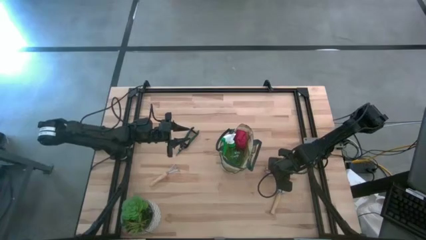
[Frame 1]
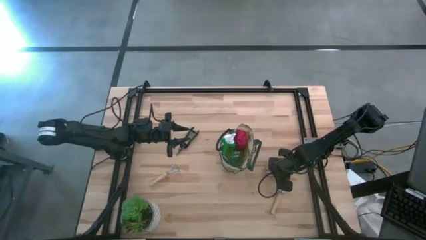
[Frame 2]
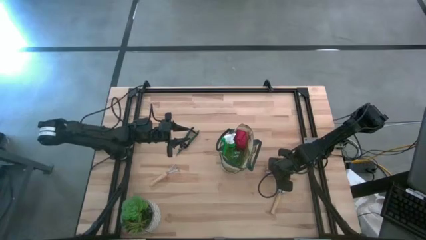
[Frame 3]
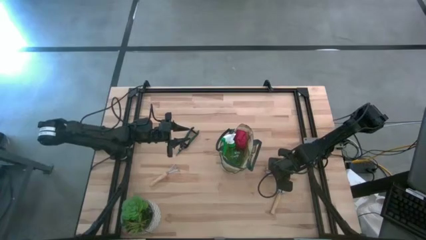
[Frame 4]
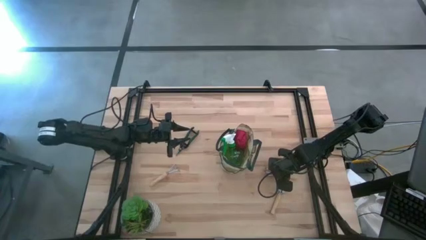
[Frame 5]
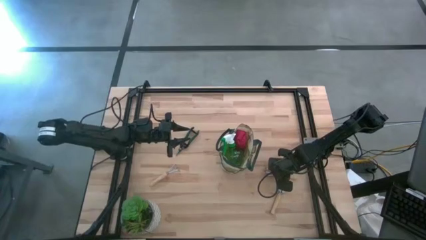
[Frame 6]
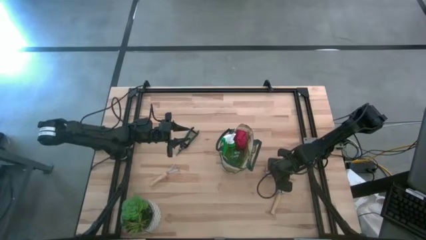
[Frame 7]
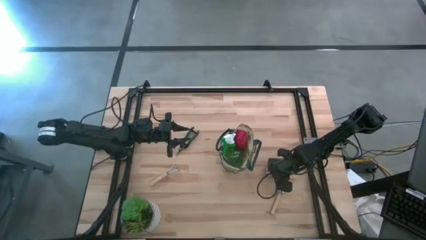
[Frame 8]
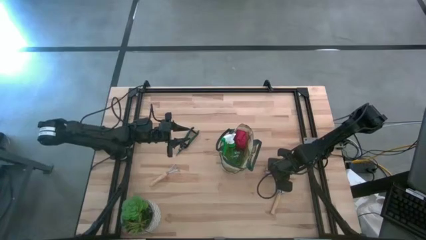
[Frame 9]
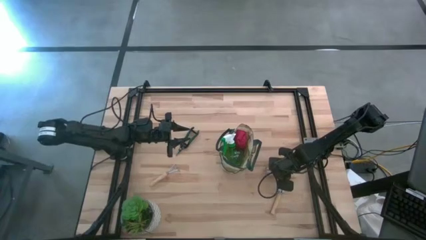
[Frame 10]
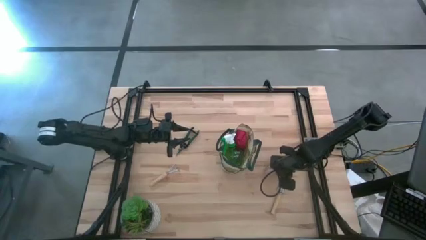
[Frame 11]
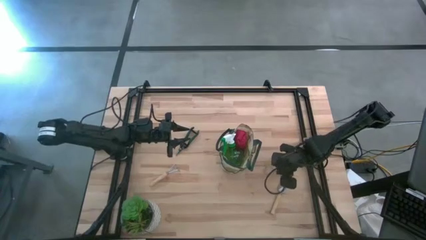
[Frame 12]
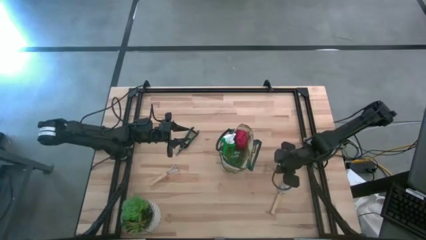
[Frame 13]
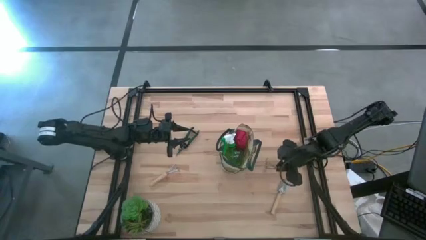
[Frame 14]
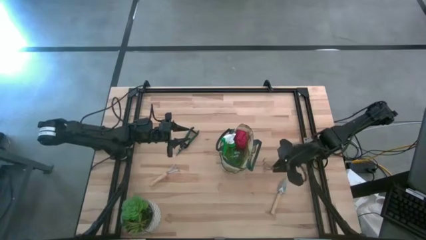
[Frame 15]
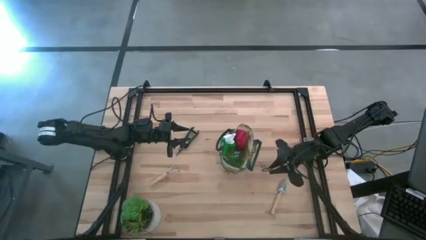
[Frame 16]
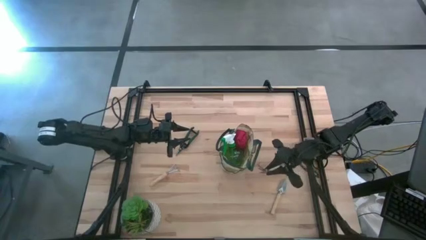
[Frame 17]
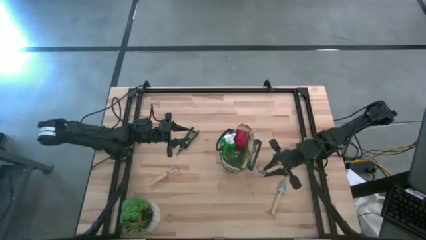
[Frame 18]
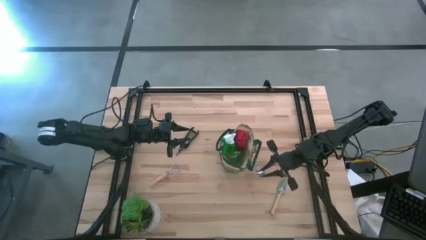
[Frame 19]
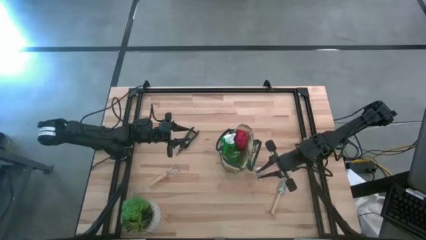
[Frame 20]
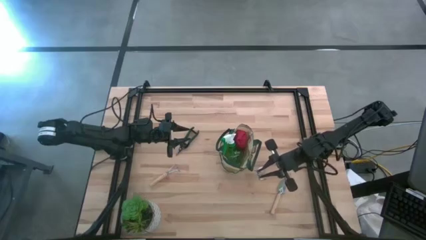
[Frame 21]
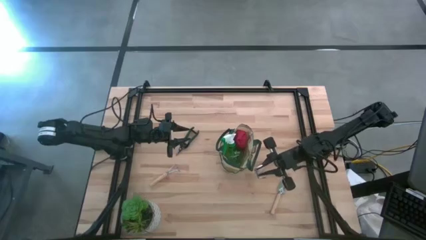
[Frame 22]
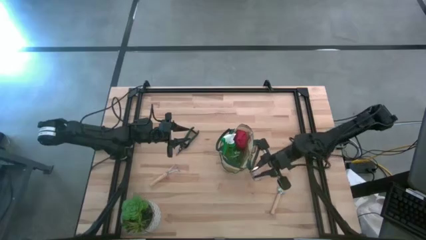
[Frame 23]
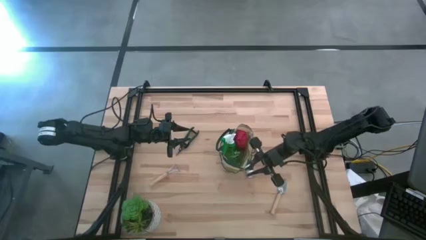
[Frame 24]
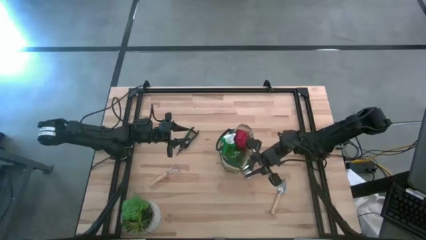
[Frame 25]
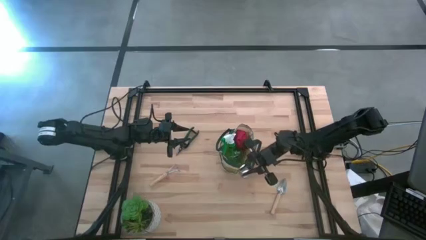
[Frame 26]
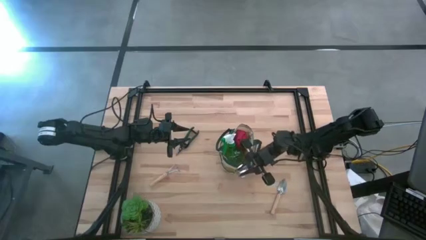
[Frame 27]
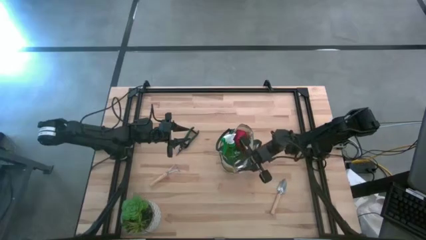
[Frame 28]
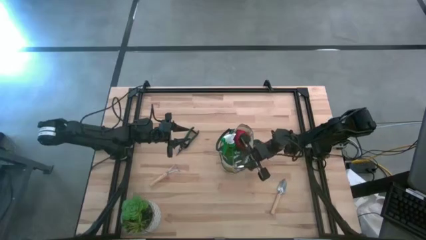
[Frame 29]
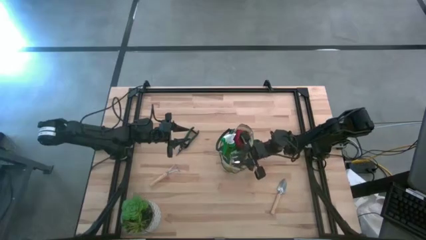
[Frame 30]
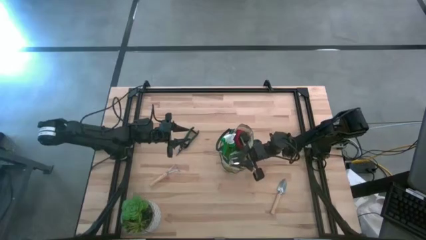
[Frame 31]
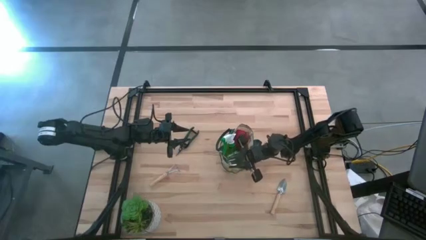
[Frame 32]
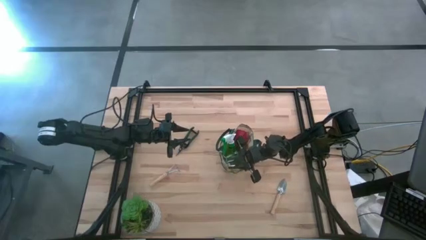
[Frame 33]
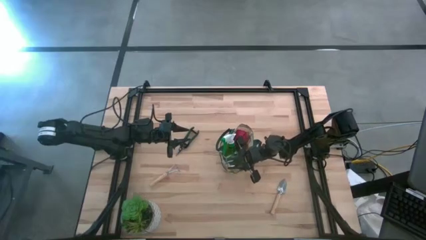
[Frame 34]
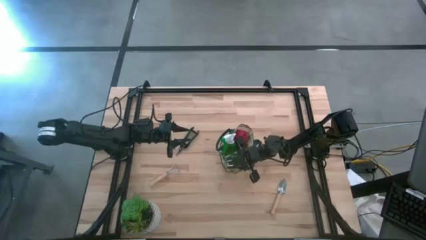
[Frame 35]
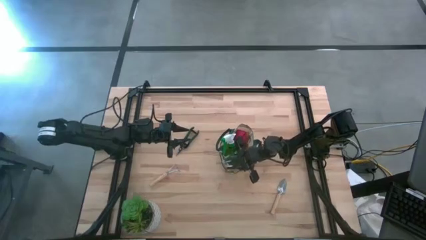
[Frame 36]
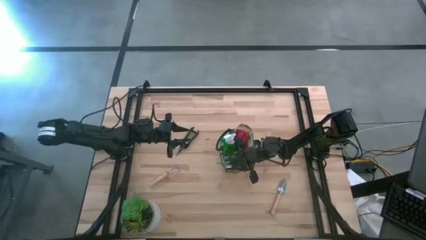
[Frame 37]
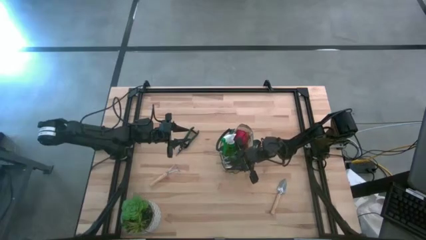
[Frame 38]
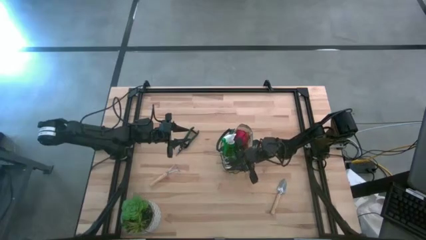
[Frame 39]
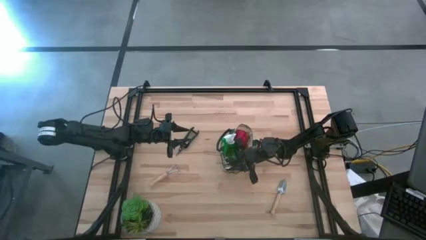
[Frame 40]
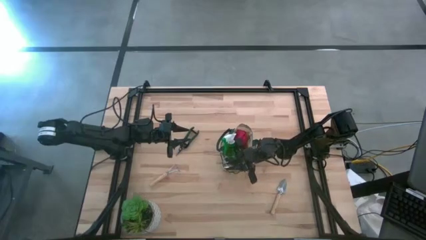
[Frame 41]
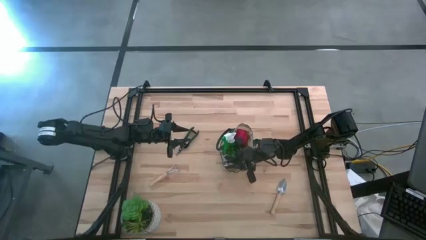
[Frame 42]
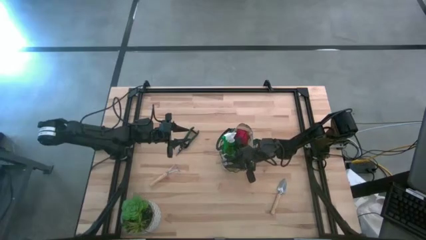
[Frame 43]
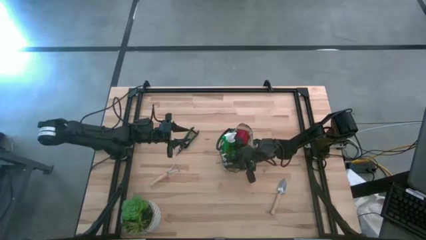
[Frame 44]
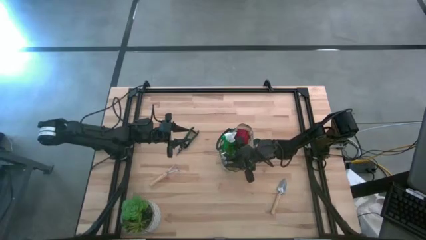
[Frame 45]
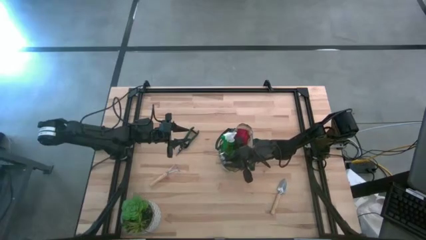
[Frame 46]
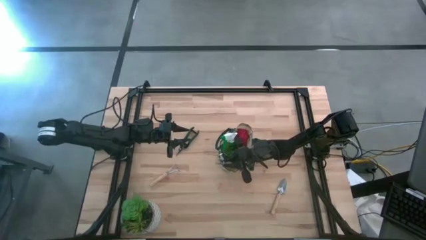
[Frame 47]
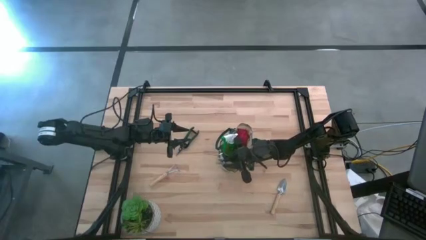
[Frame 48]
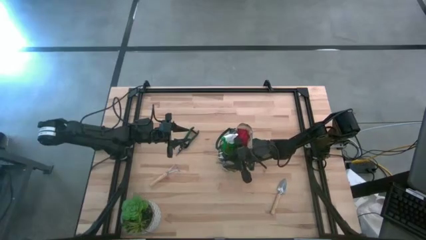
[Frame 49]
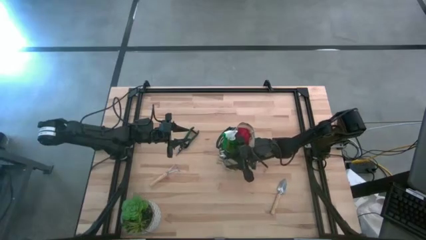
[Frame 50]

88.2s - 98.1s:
Task: Pick & Place Garden tools in Gardening bag
Put the right hand rake into the pocket of the gardening bag

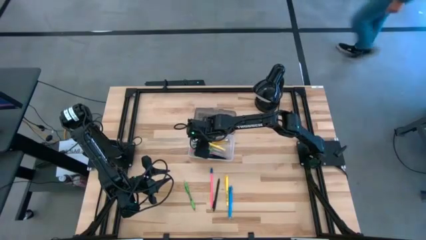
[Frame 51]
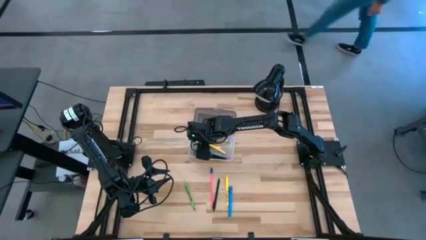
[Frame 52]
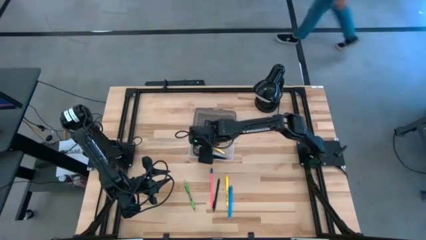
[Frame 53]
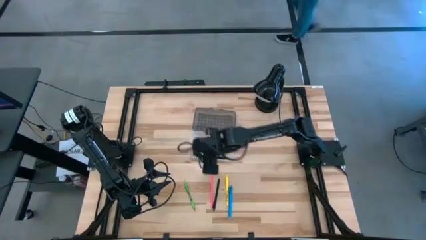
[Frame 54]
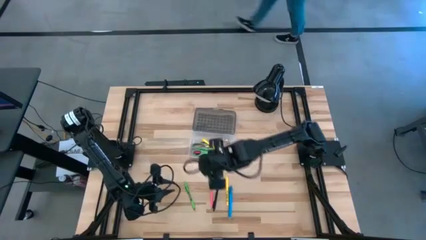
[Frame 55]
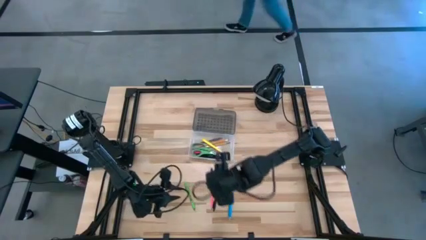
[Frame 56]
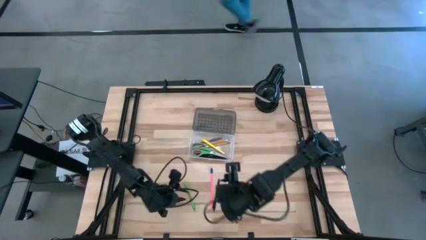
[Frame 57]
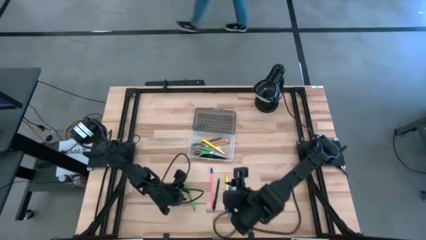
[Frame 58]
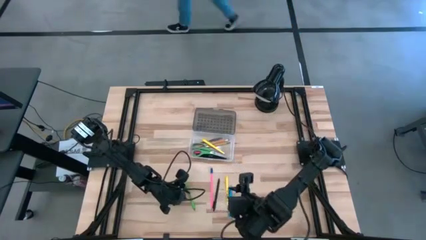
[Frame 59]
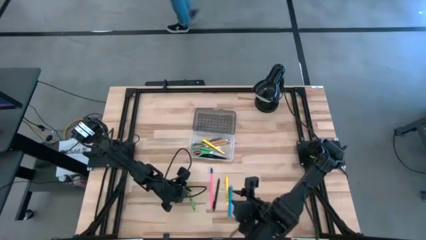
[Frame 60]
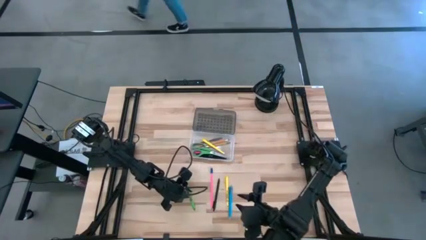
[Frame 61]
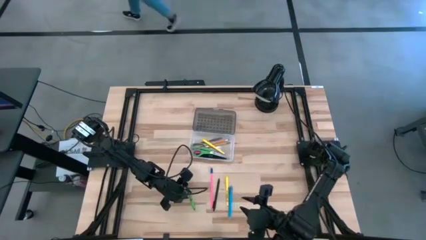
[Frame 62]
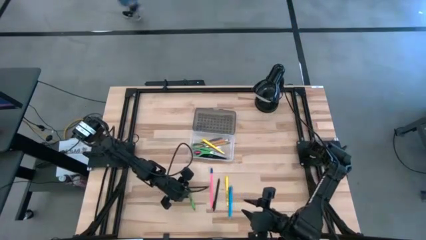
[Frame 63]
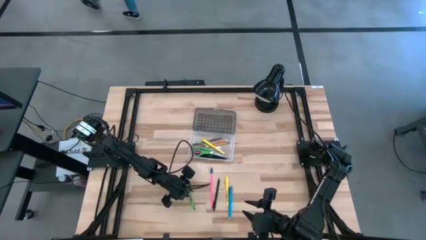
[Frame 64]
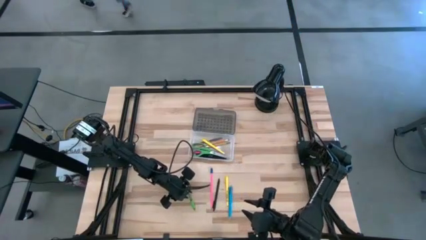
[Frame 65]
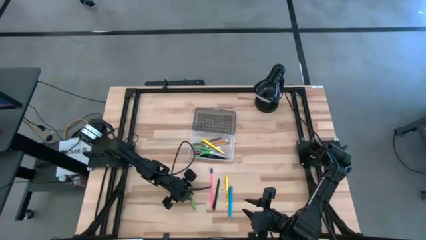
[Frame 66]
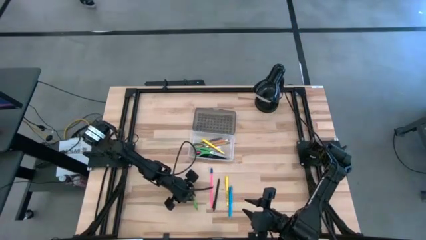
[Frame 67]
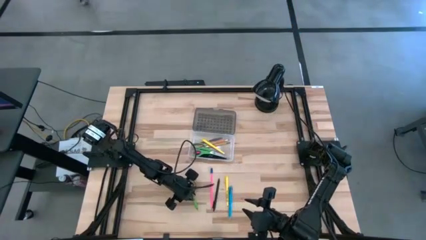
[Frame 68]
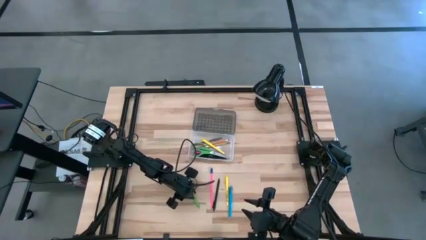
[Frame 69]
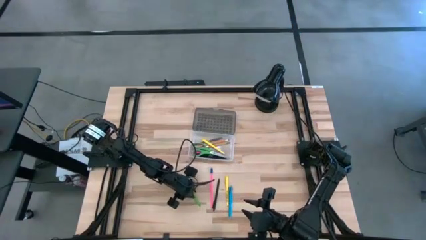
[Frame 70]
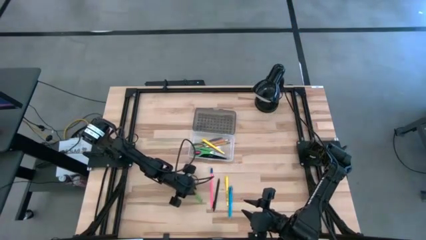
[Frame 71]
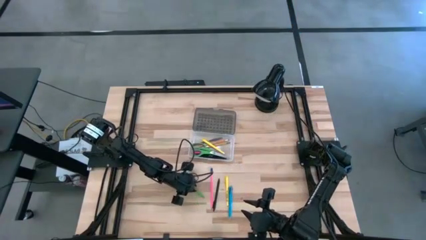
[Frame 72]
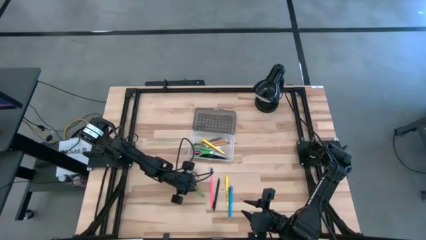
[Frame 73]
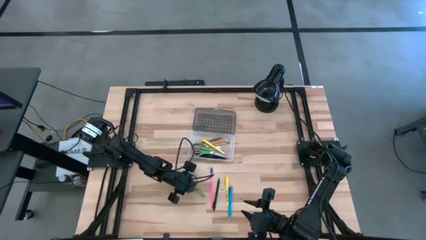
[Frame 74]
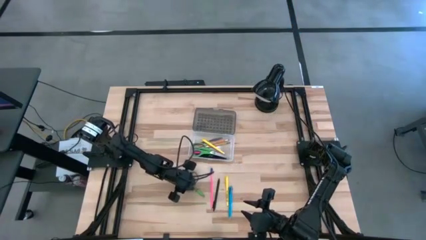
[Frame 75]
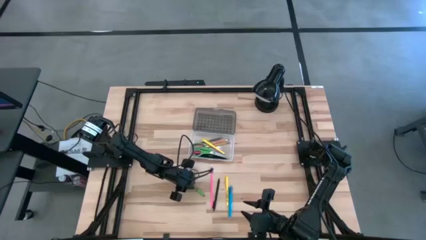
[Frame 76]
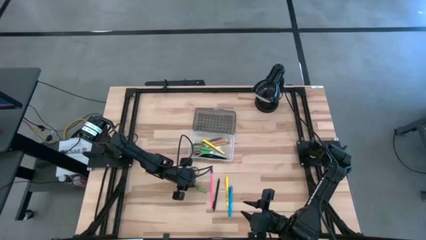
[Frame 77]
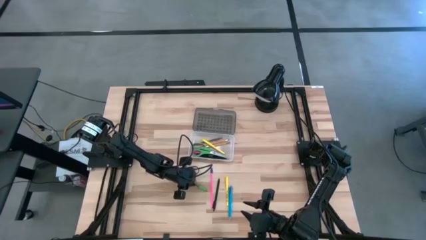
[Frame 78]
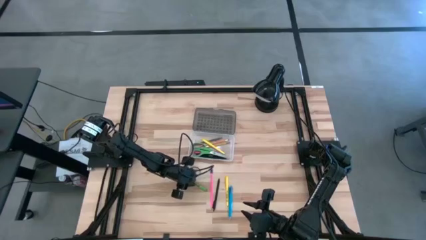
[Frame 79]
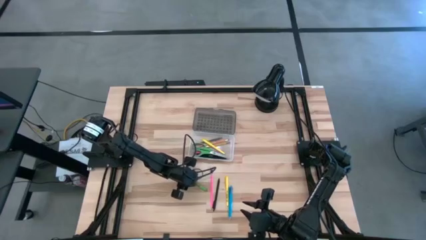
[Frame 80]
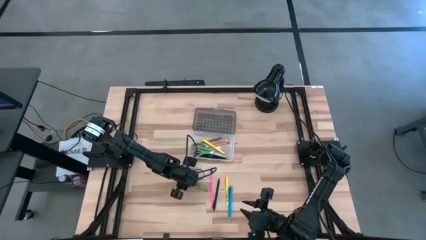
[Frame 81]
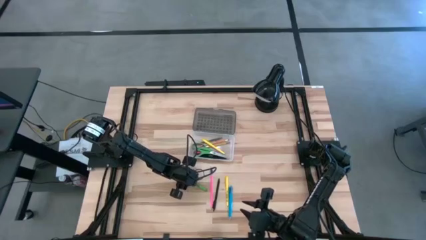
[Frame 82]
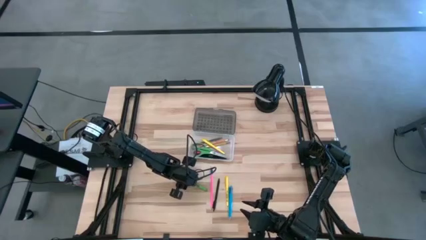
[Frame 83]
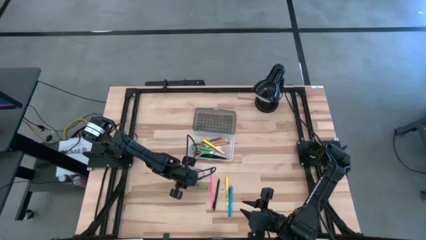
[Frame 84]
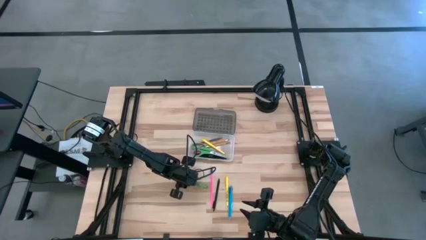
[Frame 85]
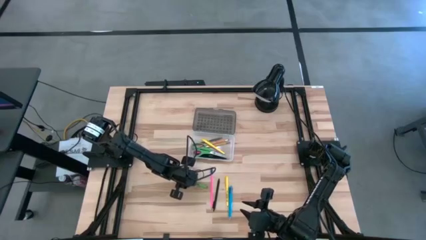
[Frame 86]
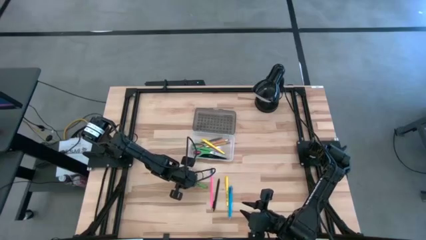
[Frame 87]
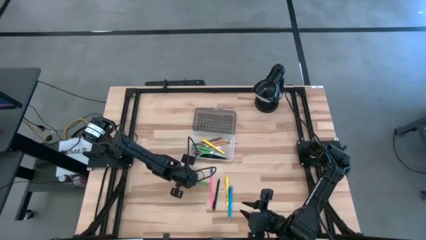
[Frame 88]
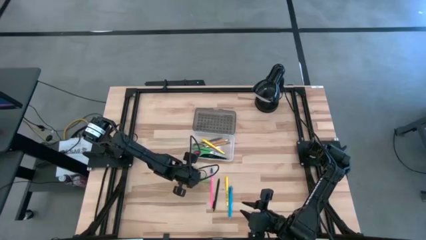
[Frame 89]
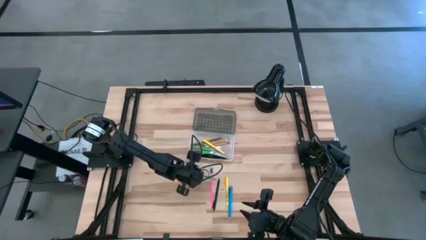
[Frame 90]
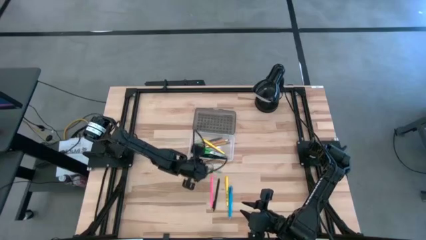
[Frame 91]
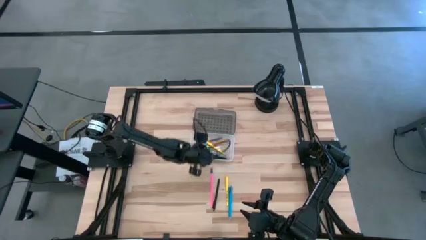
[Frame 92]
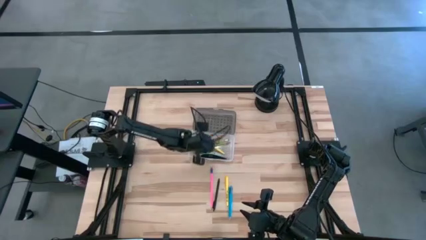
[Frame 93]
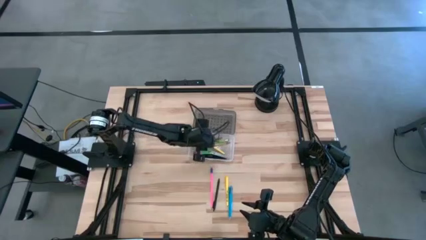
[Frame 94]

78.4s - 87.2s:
Task: Pick & place school supplies into a supply box
Put the green pen into the transparent supply box
